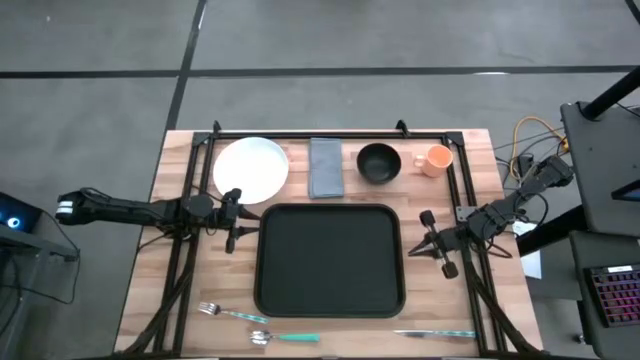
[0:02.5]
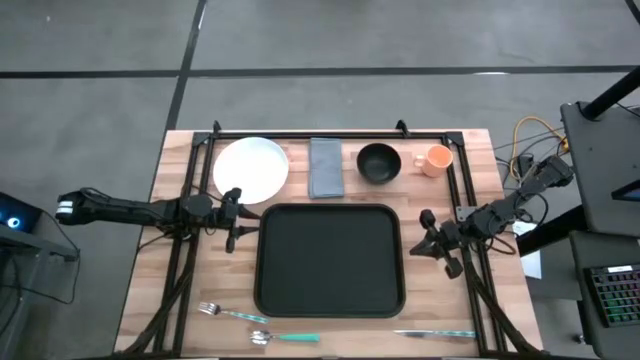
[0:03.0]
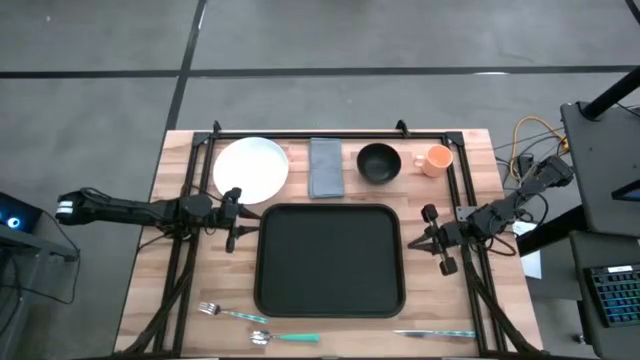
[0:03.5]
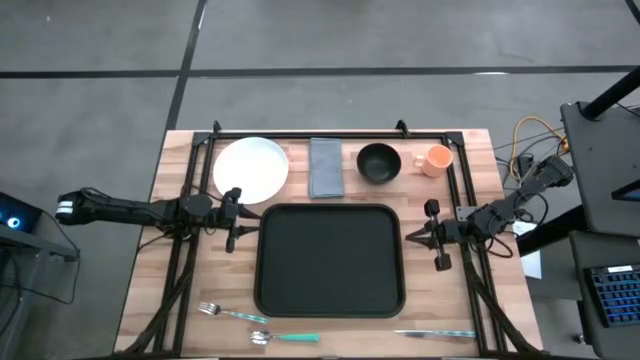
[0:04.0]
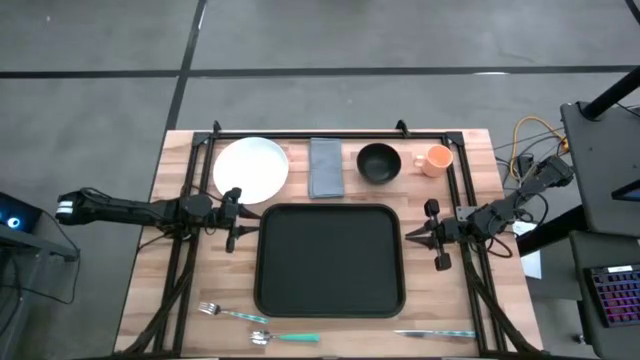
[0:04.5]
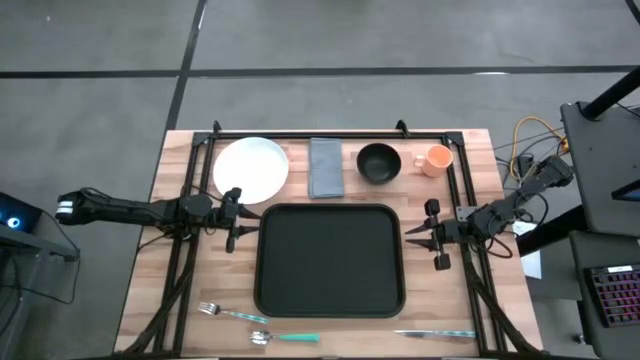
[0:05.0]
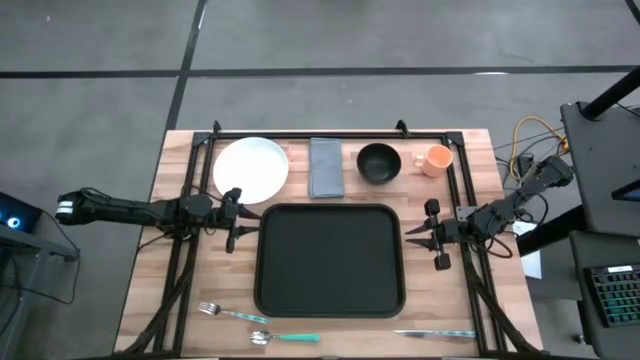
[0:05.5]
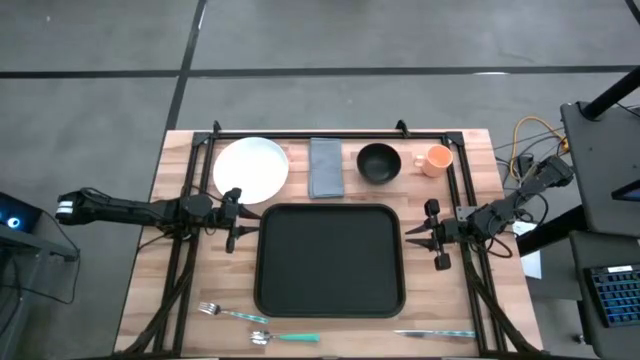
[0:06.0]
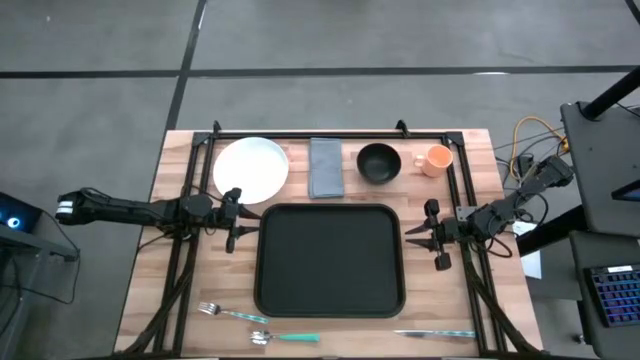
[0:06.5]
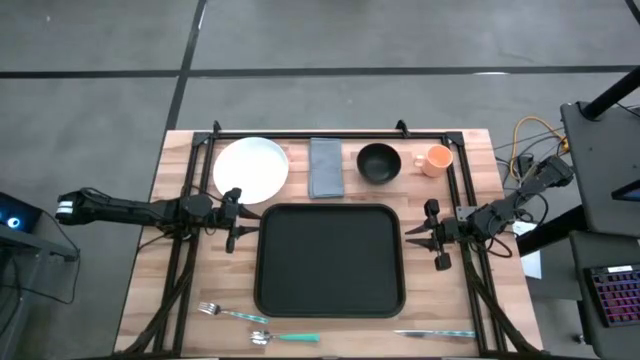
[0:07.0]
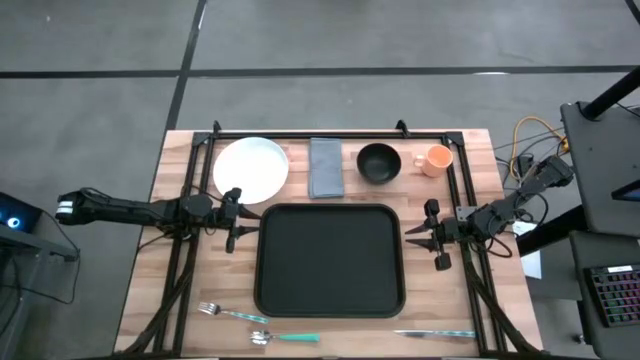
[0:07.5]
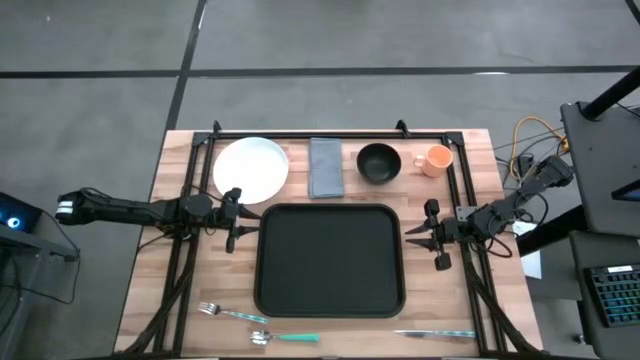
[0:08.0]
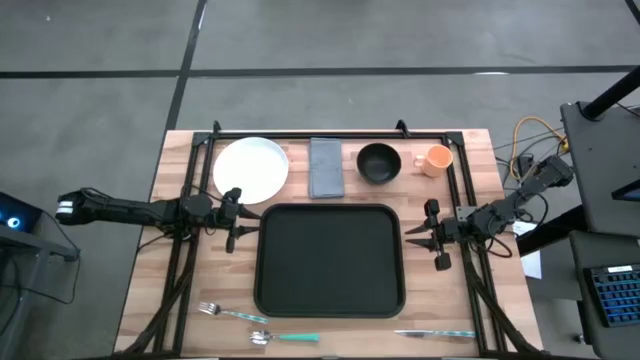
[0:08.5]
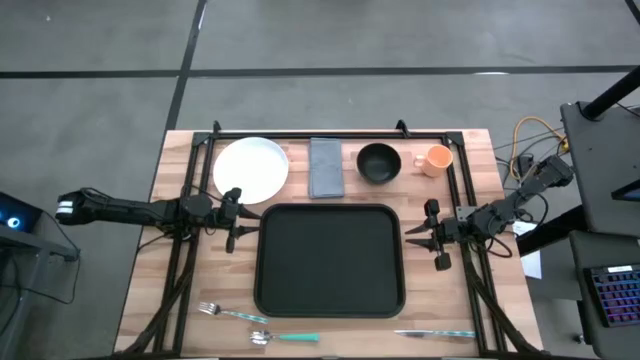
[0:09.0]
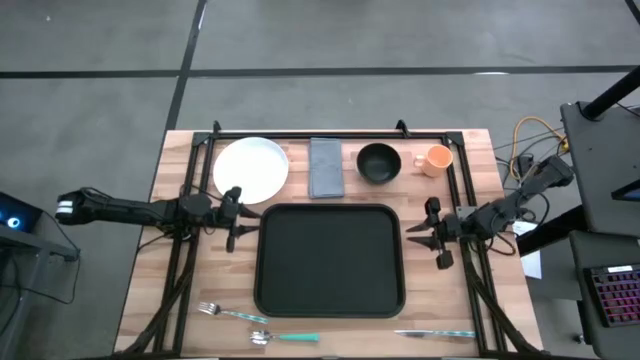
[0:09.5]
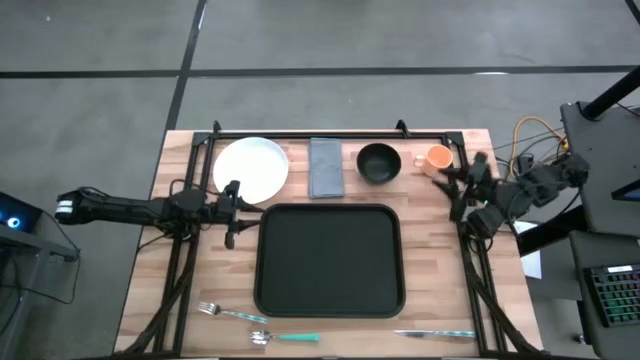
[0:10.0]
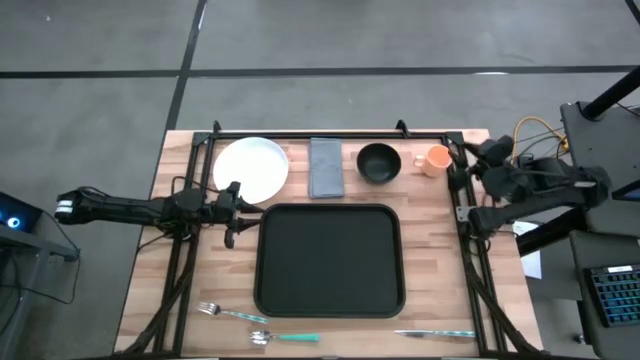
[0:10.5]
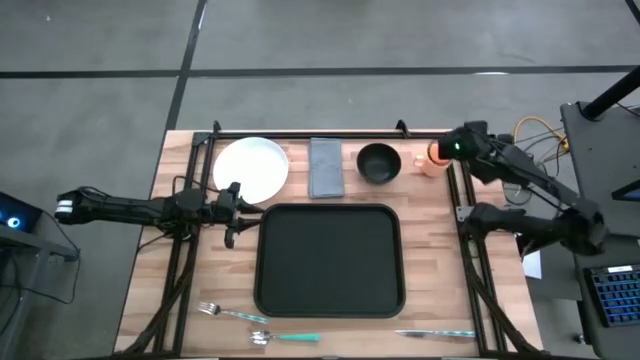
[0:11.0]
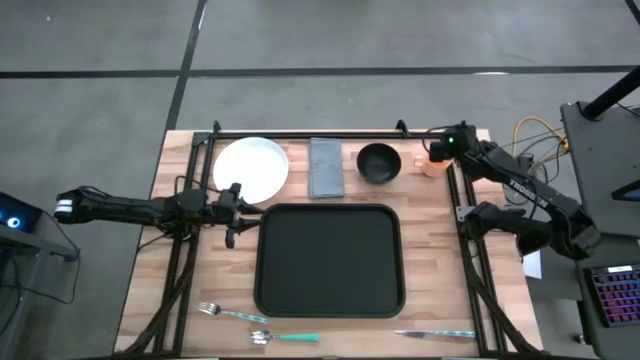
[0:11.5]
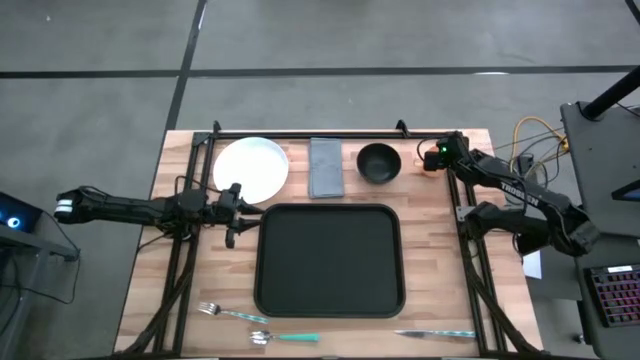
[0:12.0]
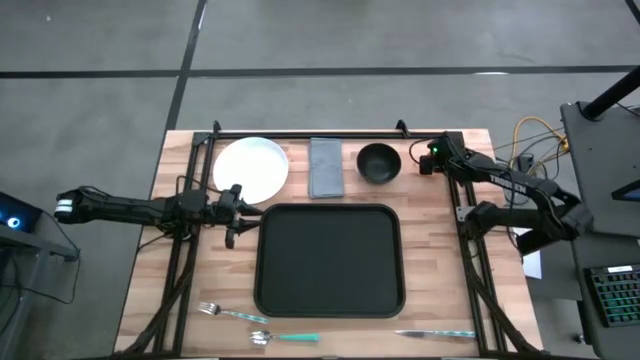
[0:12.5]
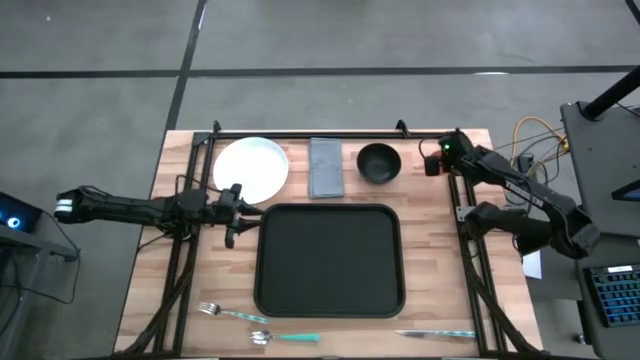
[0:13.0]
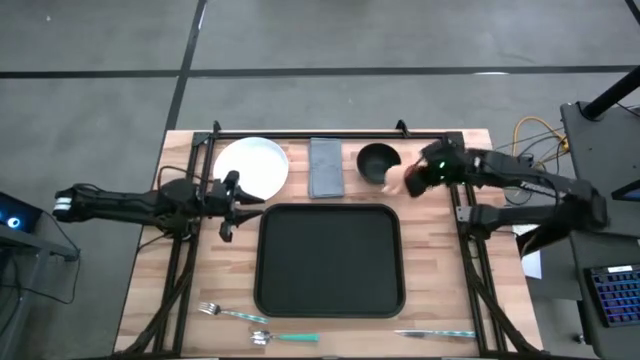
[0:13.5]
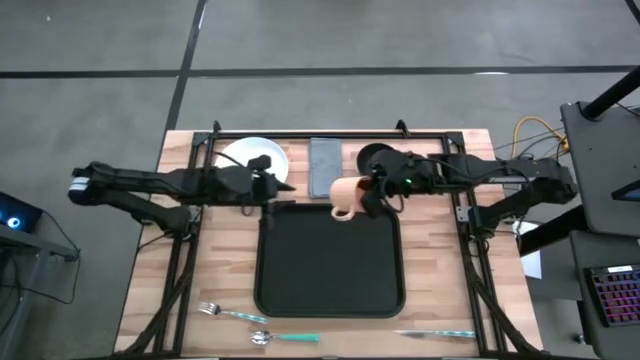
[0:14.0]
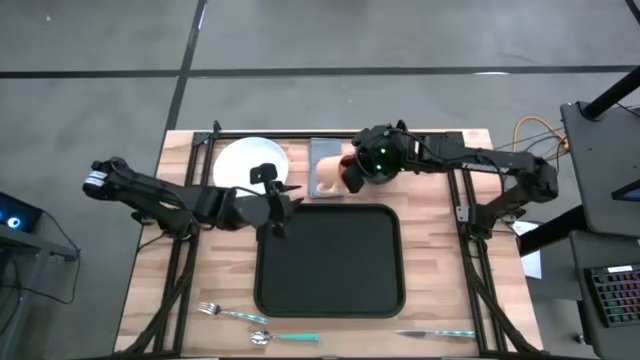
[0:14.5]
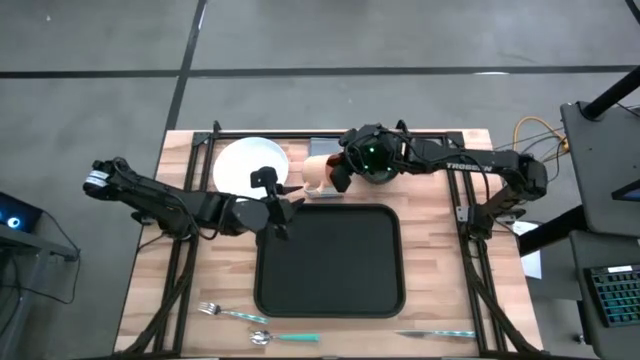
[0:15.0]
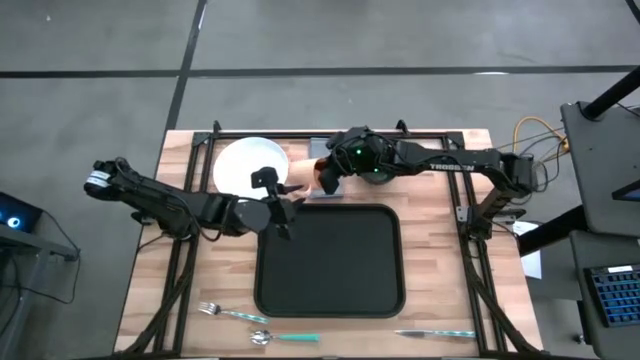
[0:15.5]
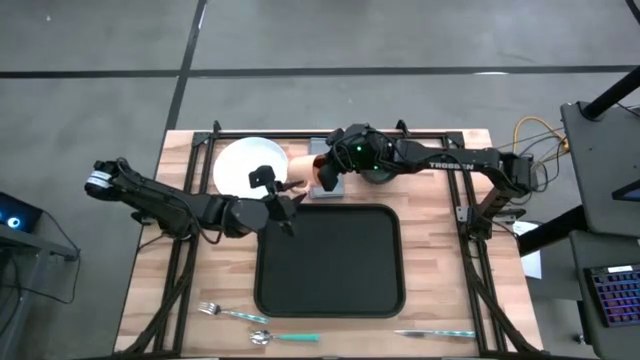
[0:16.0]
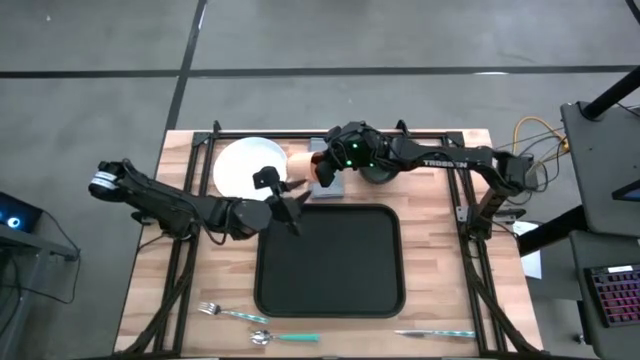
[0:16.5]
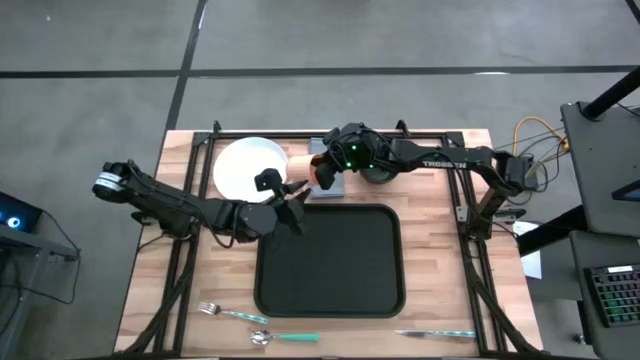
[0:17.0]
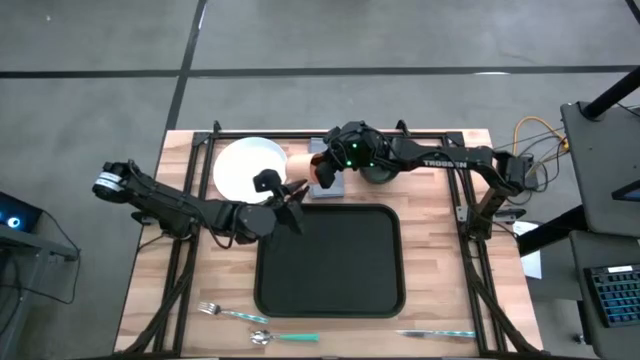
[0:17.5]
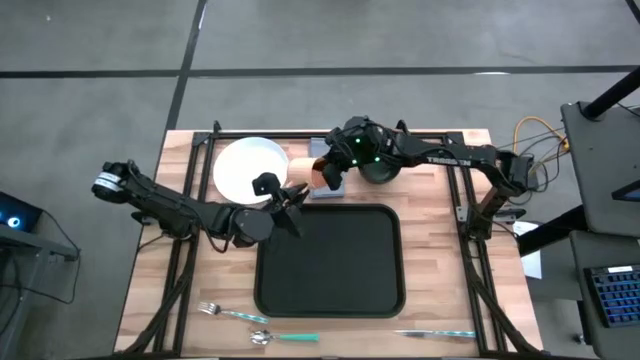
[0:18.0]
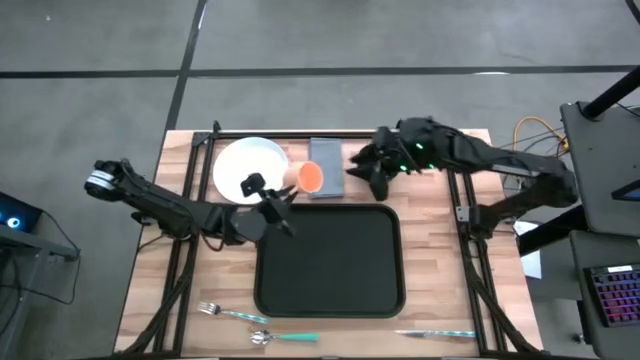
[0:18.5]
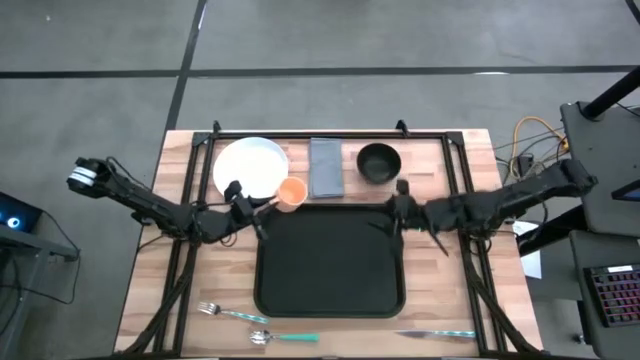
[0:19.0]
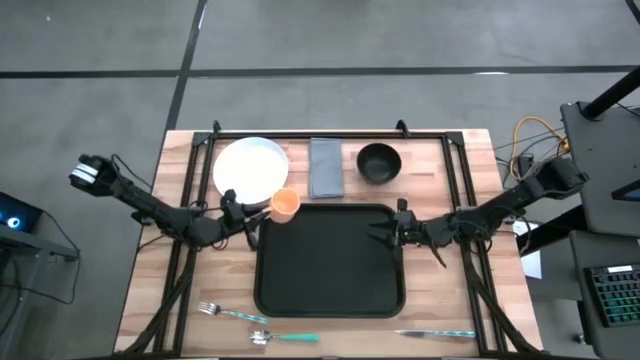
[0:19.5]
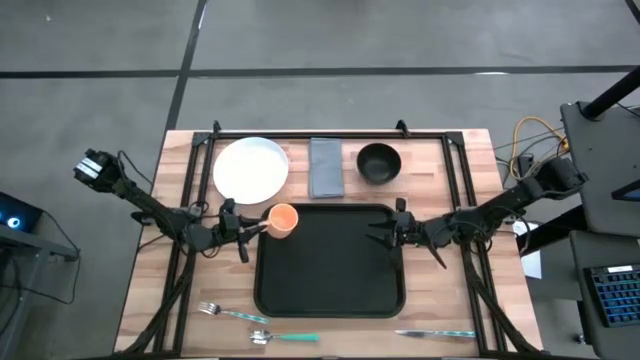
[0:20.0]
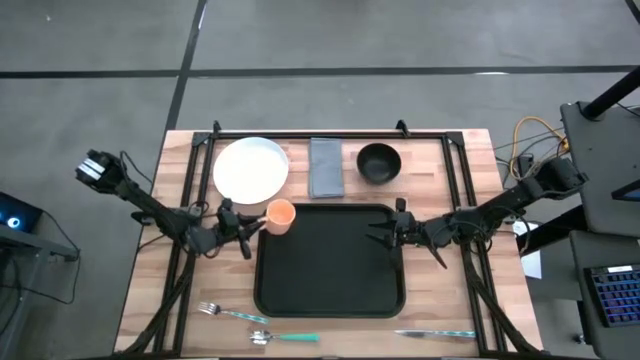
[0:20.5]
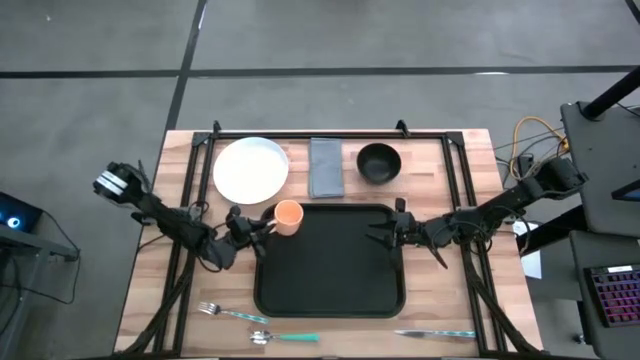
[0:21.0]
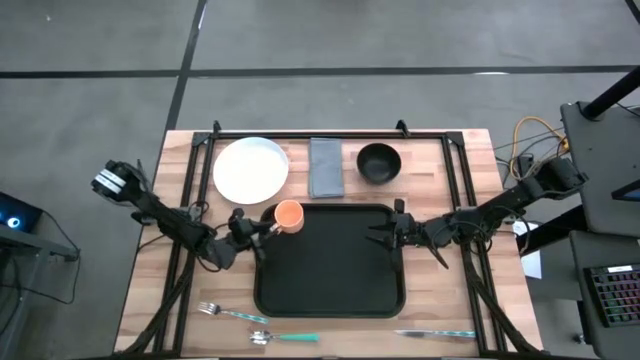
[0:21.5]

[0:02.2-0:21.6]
Task: Set up tray
Put the orange mug on the black serving tray
